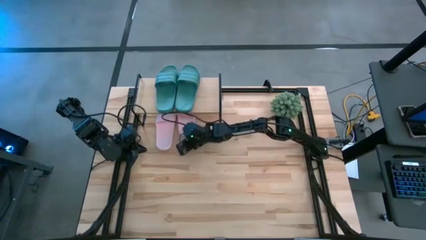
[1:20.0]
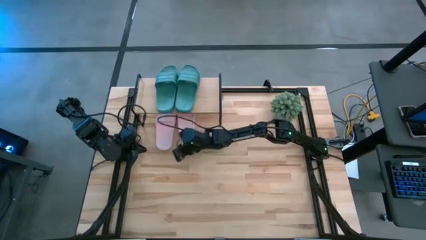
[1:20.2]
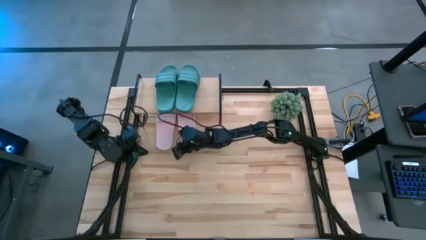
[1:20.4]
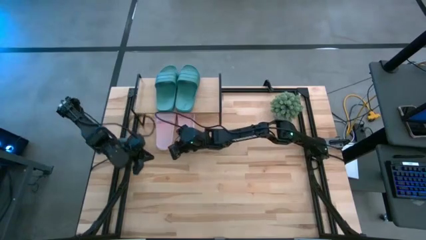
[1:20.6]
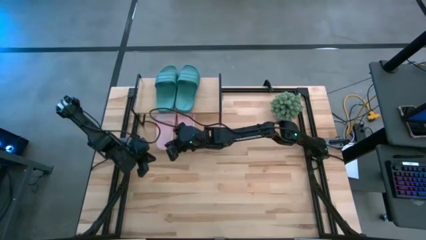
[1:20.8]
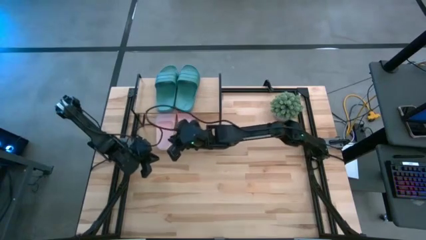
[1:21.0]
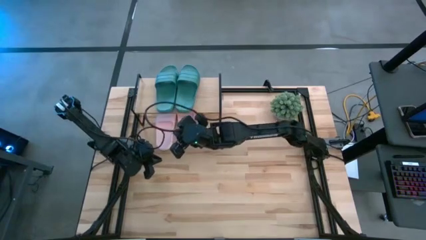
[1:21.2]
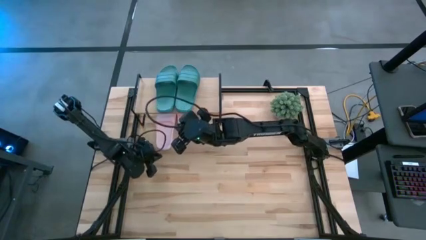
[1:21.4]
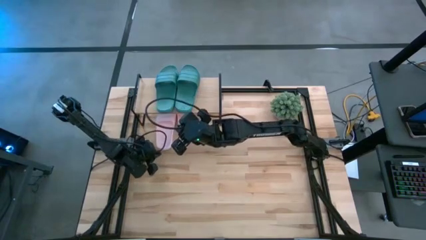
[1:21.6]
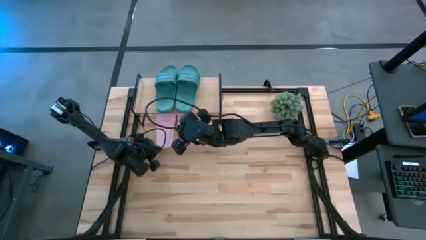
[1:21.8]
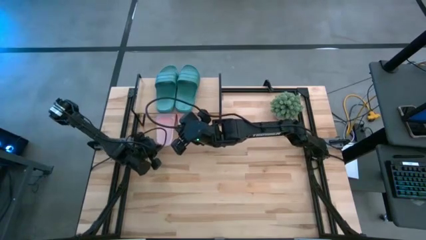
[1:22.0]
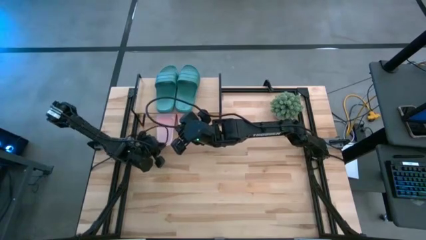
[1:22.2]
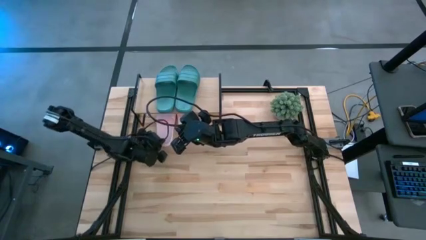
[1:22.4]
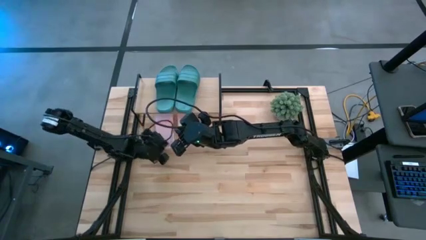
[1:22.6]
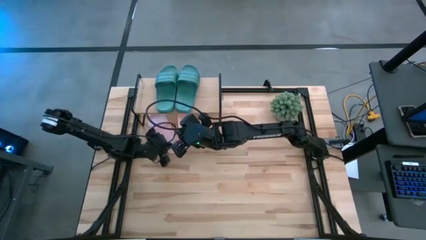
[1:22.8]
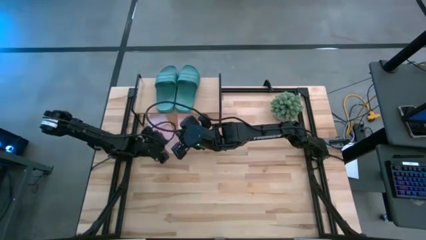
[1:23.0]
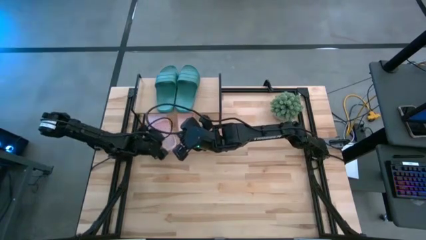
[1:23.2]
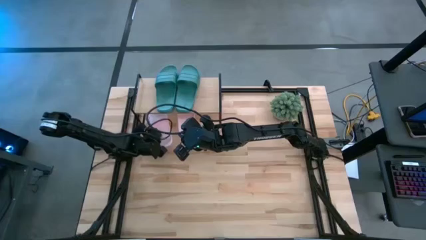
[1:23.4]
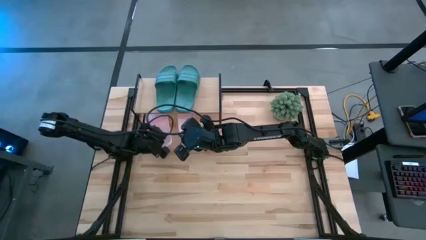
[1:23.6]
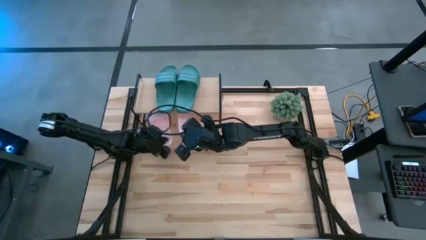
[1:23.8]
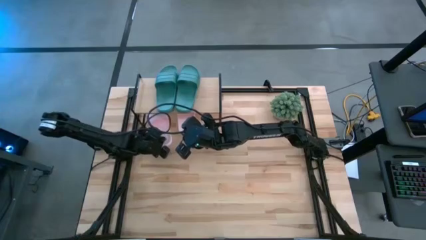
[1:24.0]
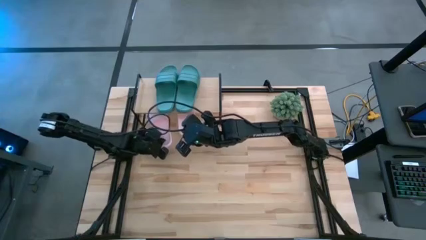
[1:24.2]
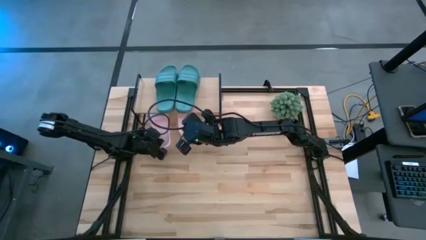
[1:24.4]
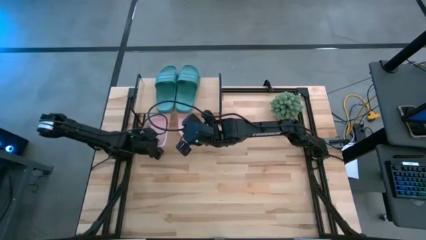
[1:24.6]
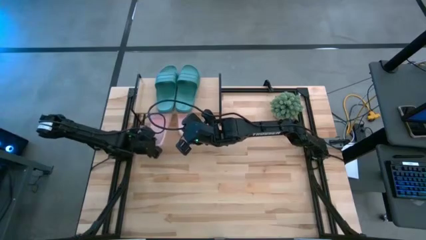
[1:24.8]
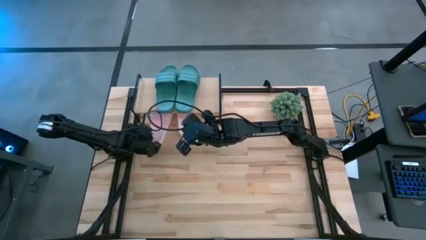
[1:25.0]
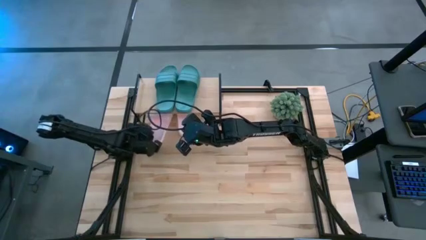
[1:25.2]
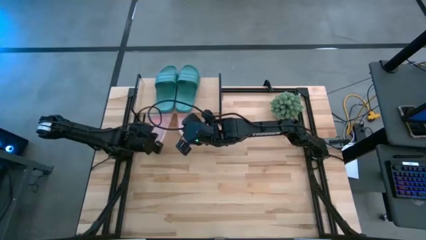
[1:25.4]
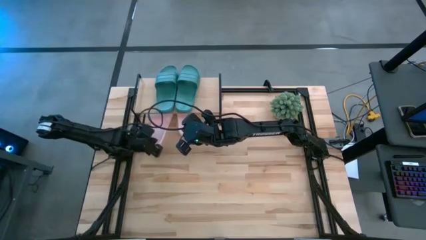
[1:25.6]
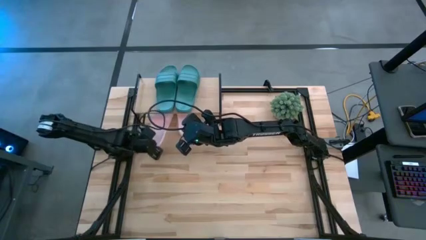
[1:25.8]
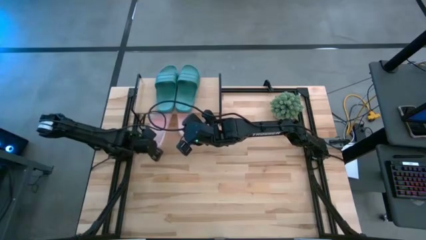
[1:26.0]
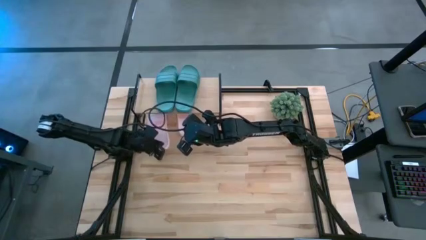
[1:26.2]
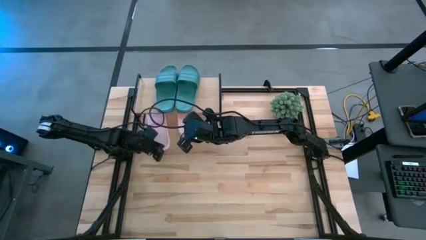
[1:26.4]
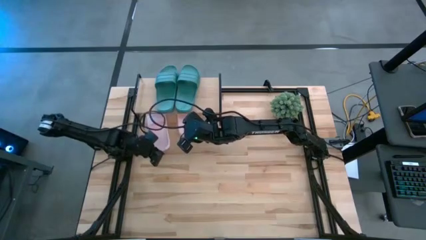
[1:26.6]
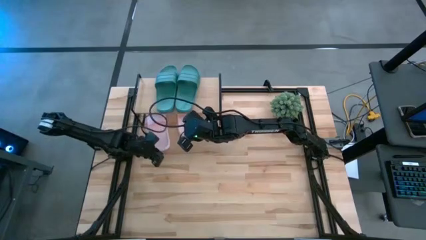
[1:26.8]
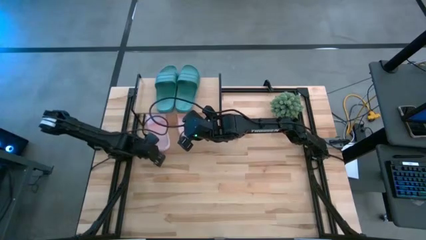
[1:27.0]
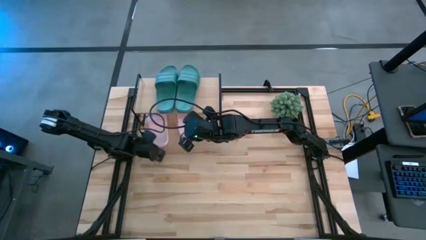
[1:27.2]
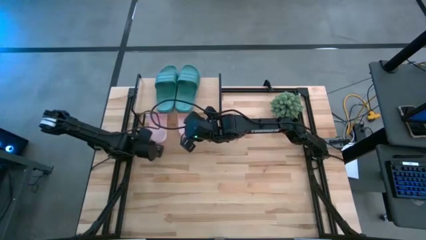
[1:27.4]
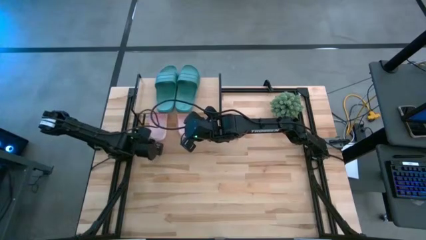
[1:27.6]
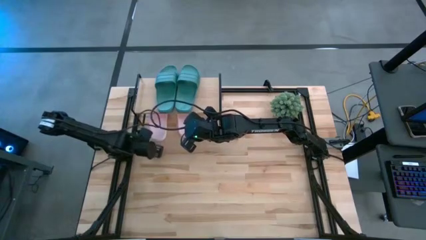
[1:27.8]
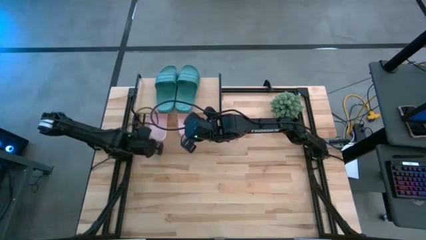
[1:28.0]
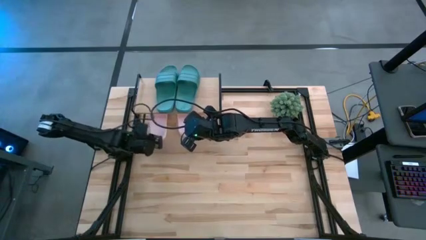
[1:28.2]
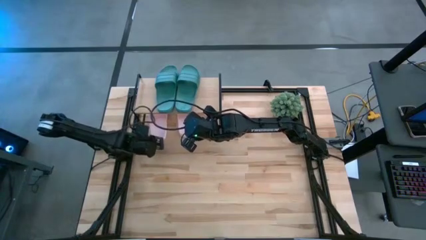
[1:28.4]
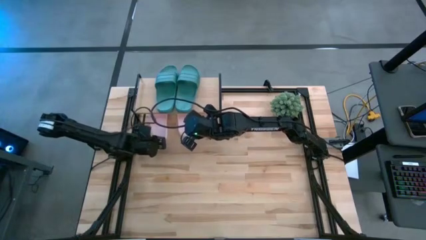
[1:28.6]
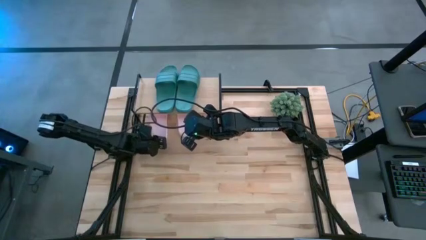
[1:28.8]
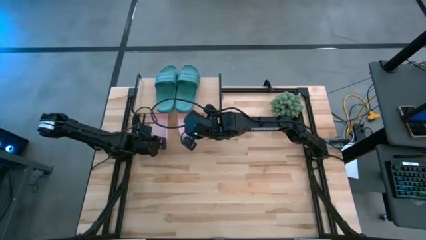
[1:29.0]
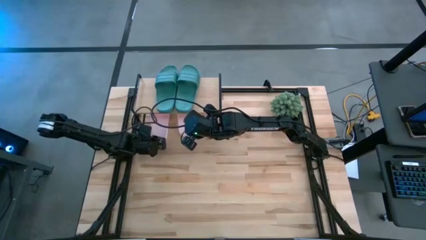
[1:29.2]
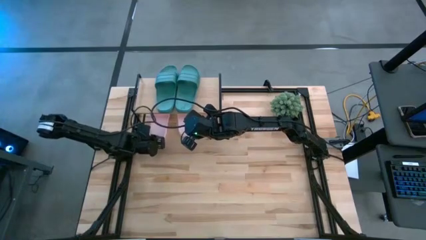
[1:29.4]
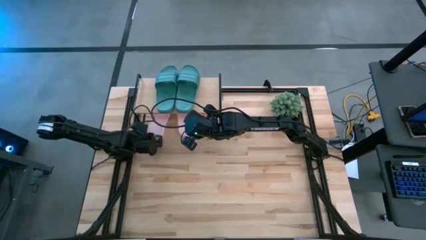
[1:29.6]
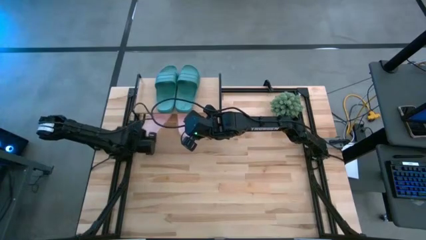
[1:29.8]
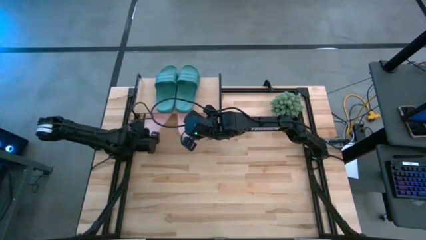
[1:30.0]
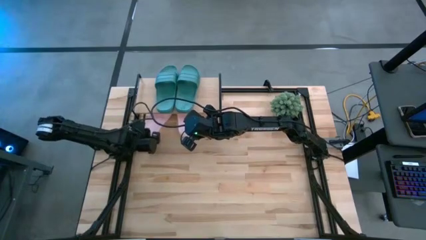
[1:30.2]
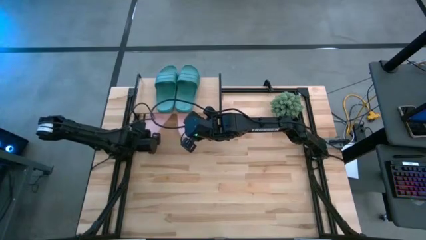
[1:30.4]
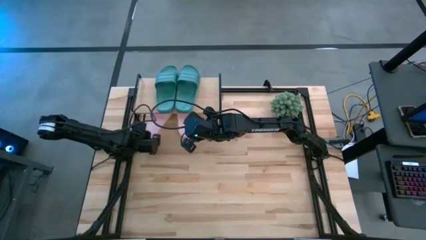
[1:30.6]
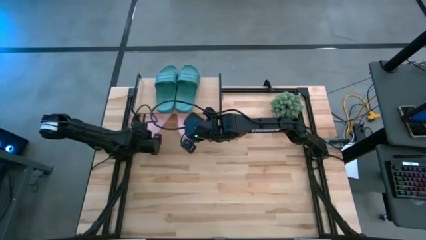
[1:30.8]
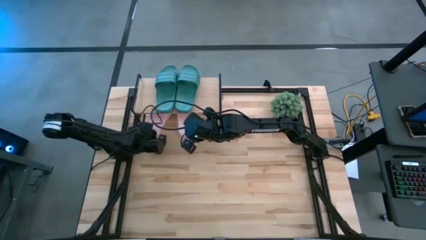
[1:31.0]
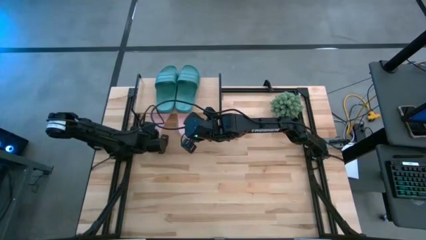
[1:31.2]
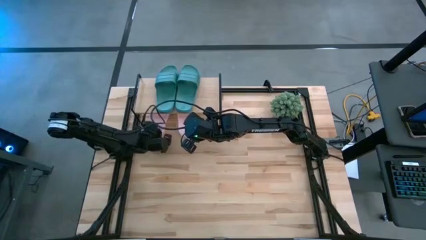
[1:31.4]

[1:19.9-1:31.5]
Task: Pick and place slides into the shelf
Adjust the left pink slide under the shelf
